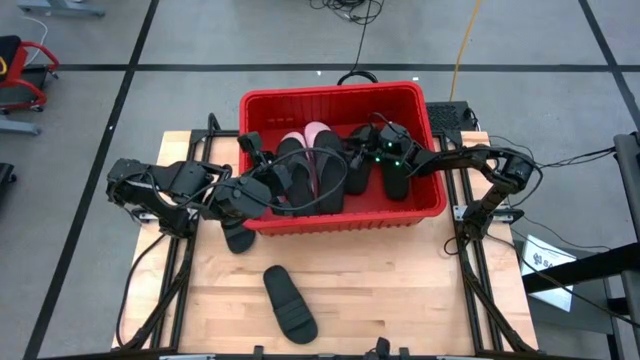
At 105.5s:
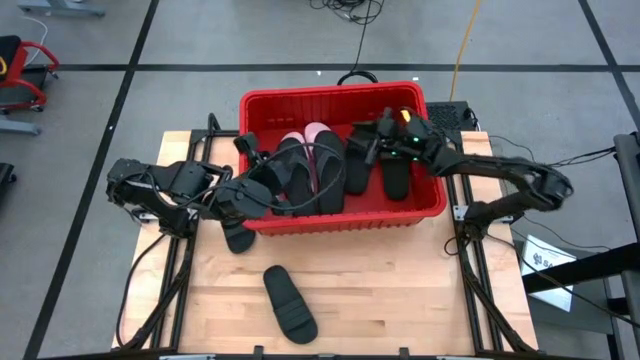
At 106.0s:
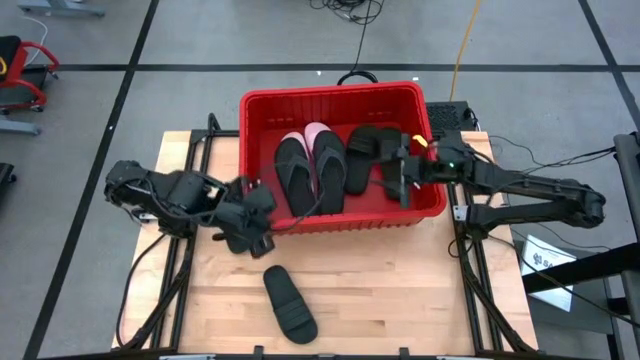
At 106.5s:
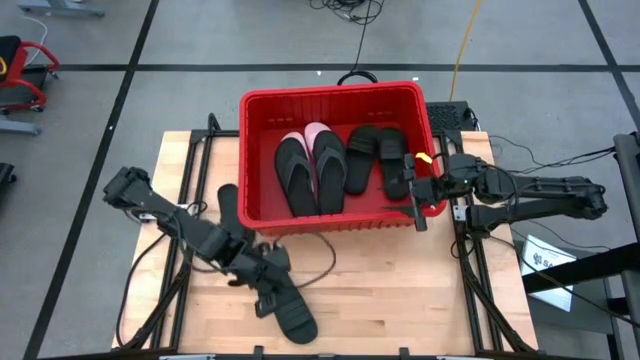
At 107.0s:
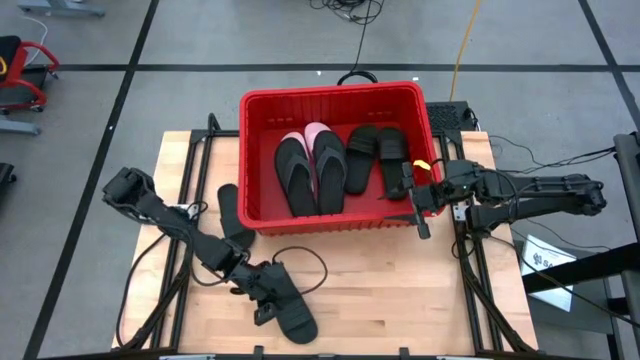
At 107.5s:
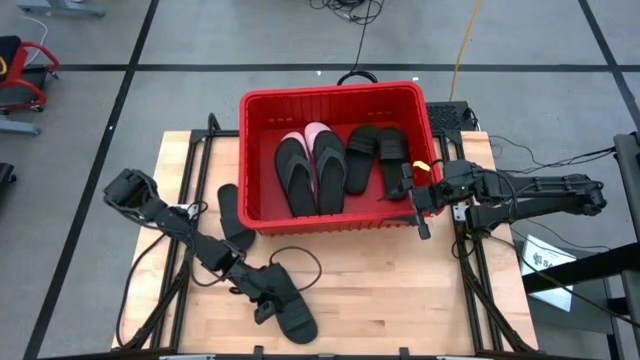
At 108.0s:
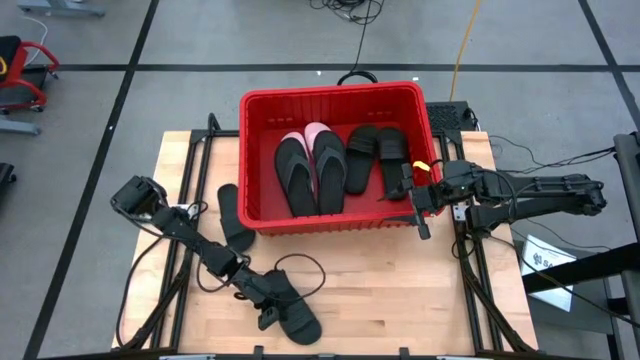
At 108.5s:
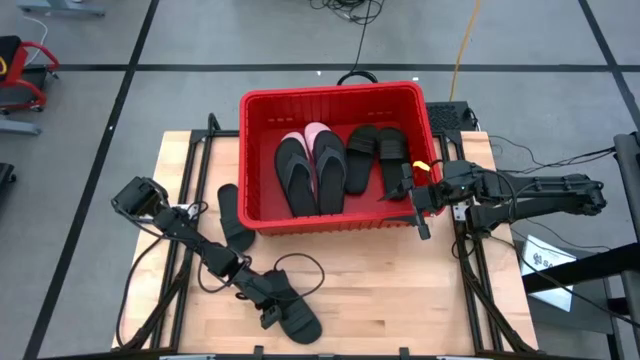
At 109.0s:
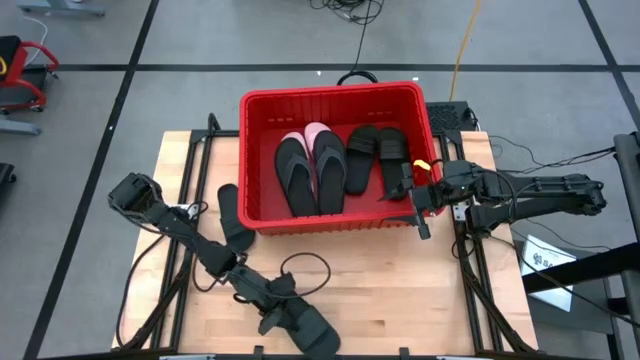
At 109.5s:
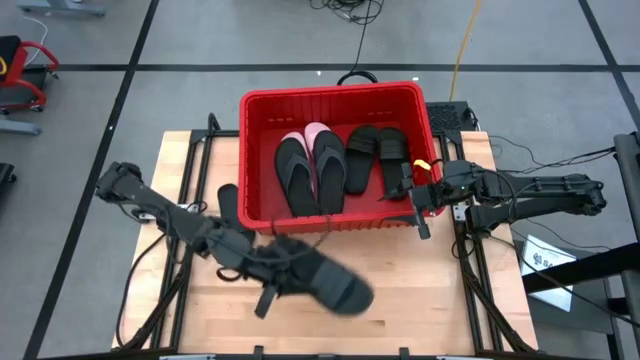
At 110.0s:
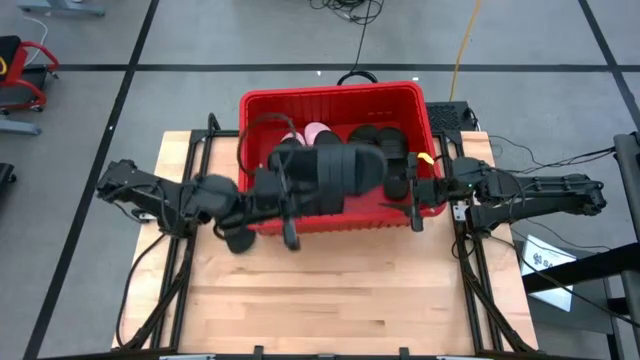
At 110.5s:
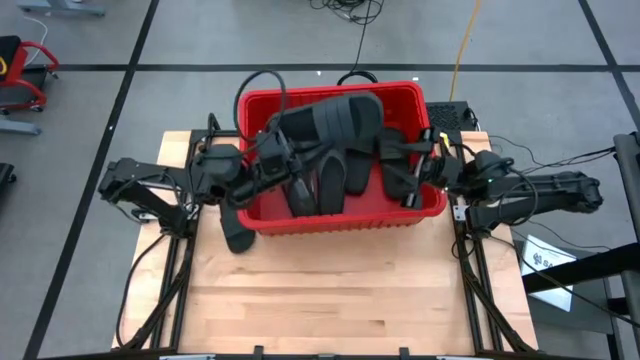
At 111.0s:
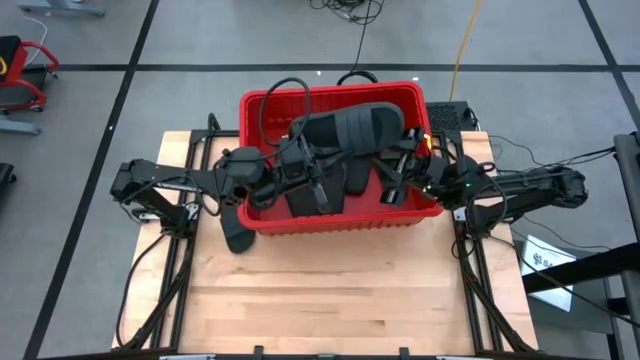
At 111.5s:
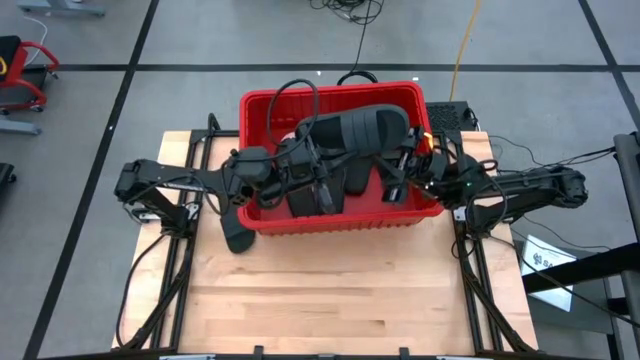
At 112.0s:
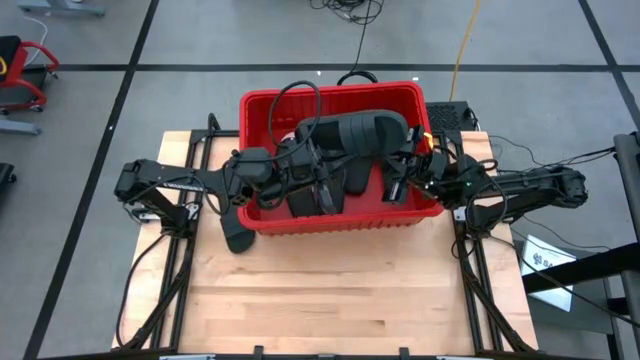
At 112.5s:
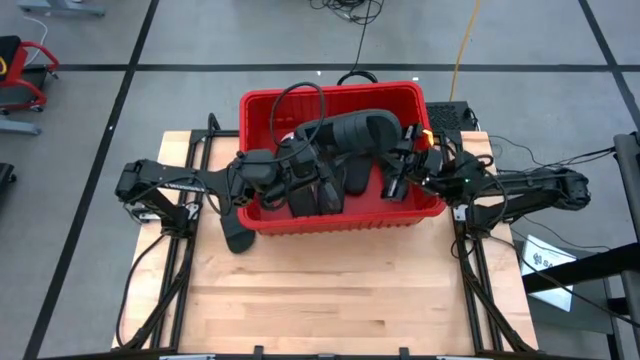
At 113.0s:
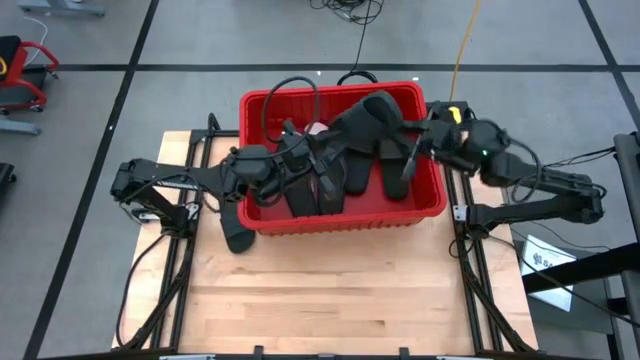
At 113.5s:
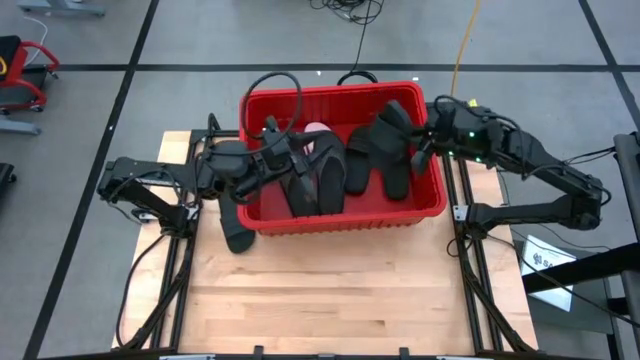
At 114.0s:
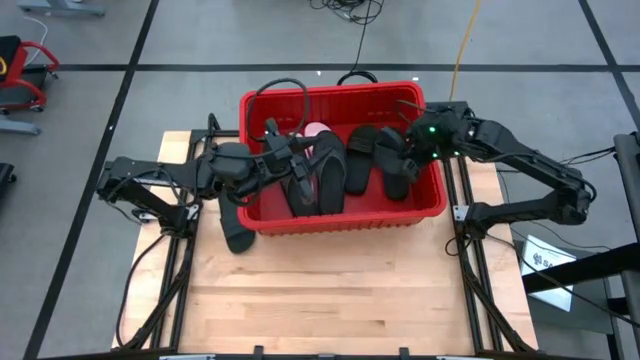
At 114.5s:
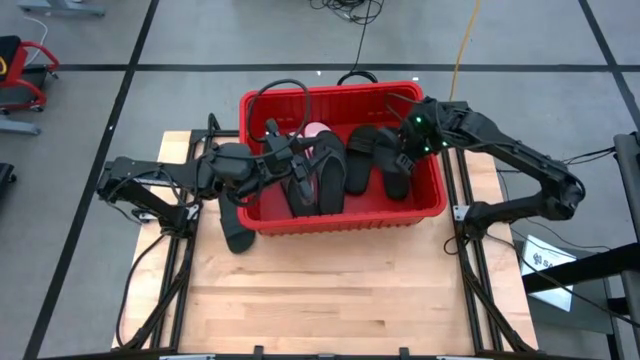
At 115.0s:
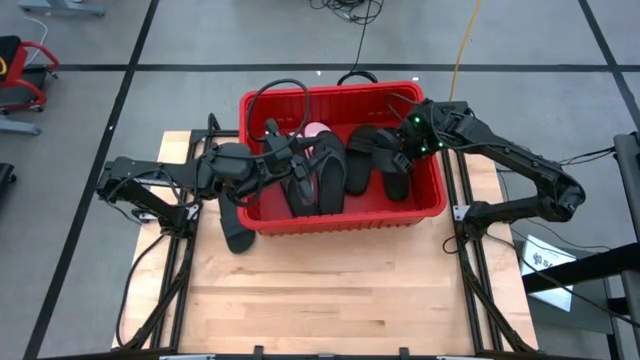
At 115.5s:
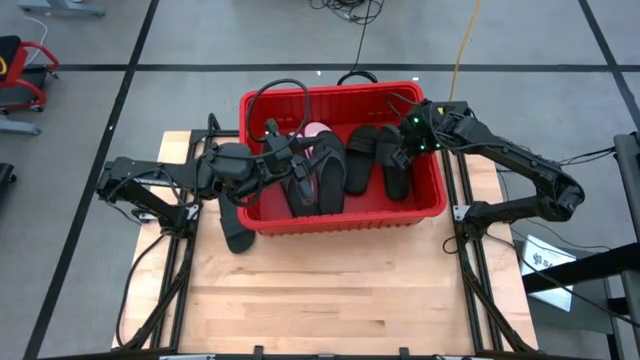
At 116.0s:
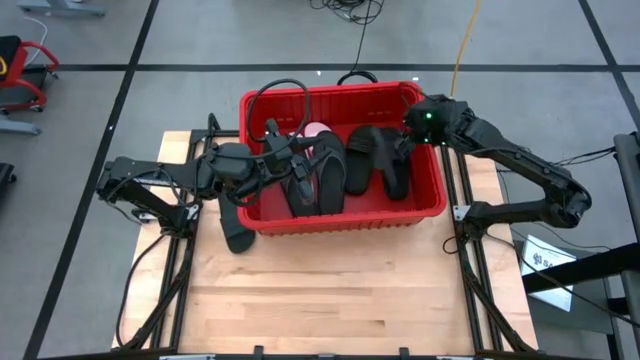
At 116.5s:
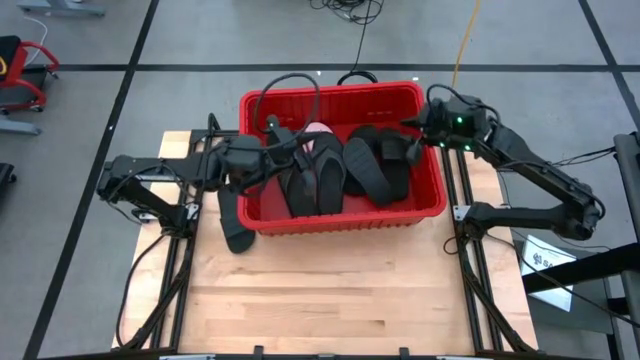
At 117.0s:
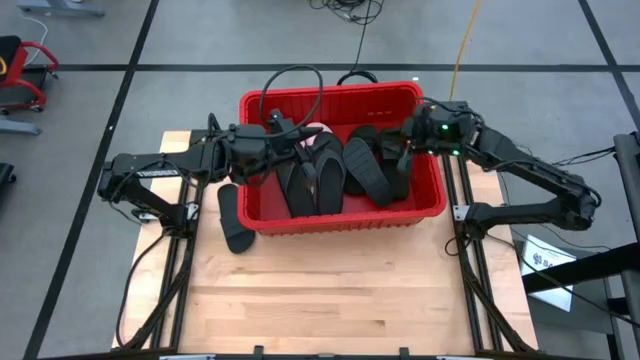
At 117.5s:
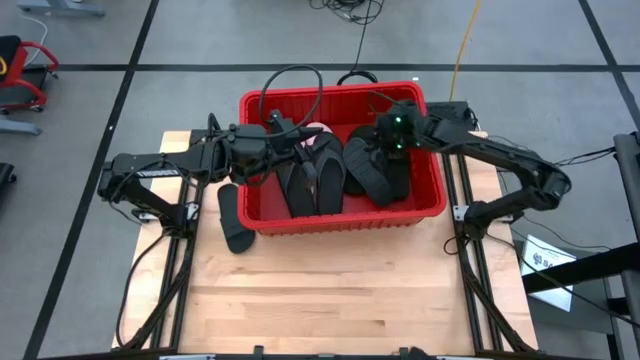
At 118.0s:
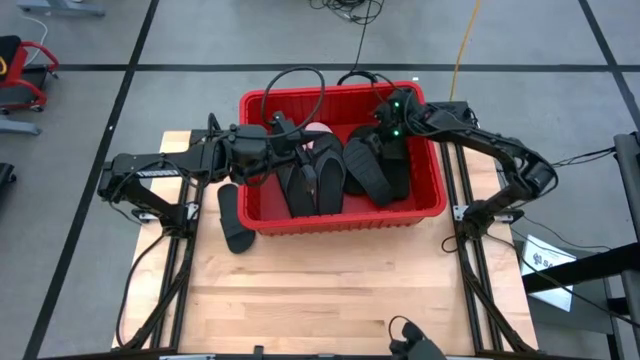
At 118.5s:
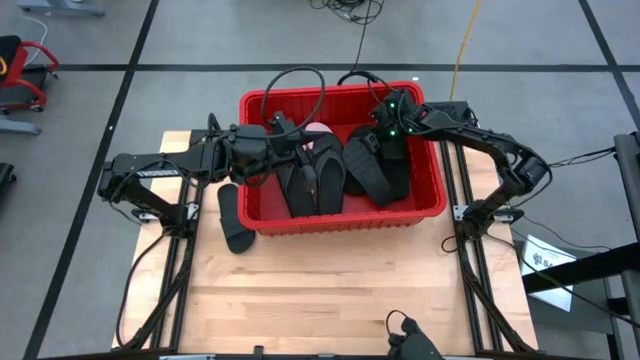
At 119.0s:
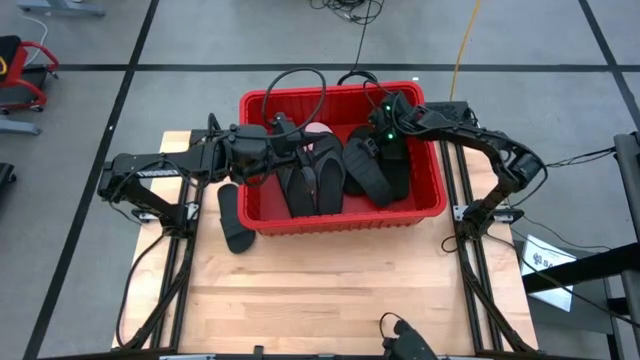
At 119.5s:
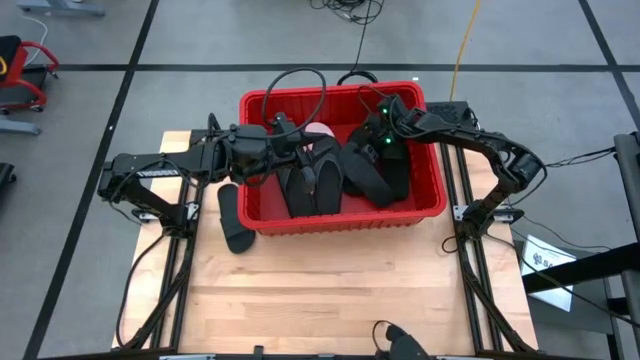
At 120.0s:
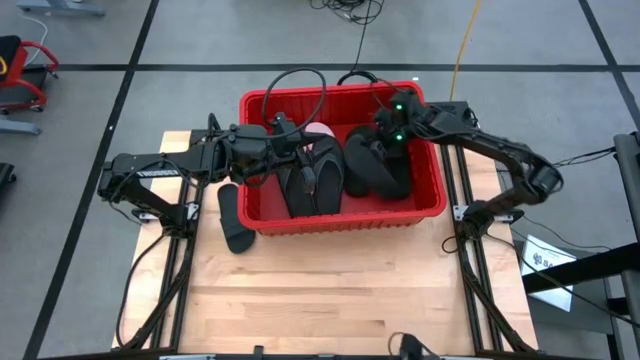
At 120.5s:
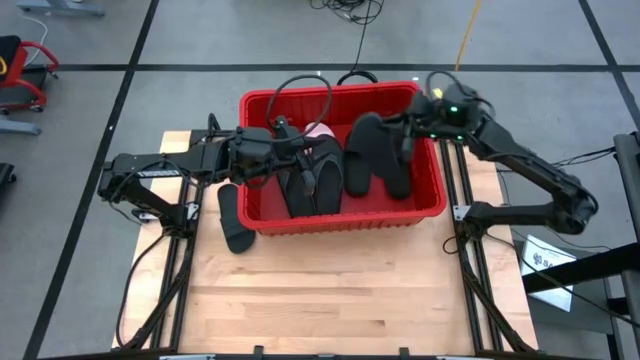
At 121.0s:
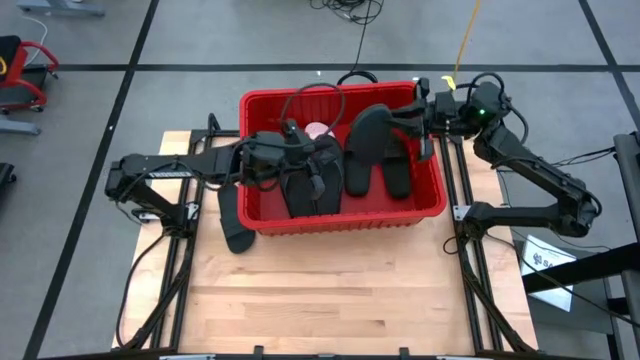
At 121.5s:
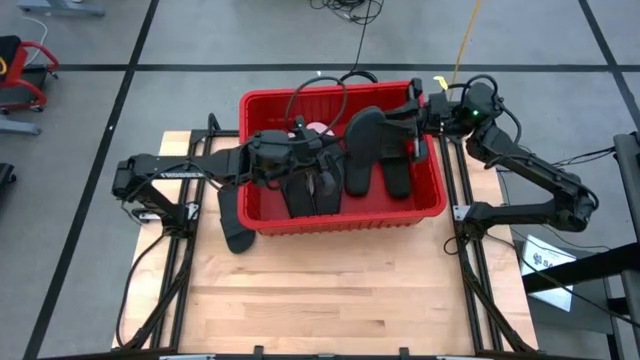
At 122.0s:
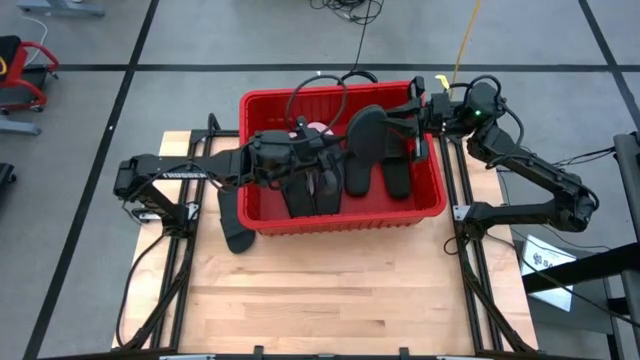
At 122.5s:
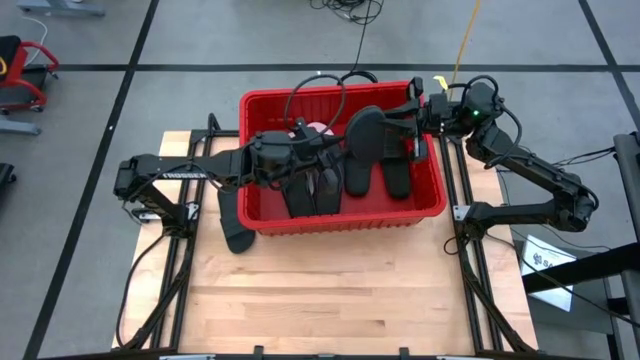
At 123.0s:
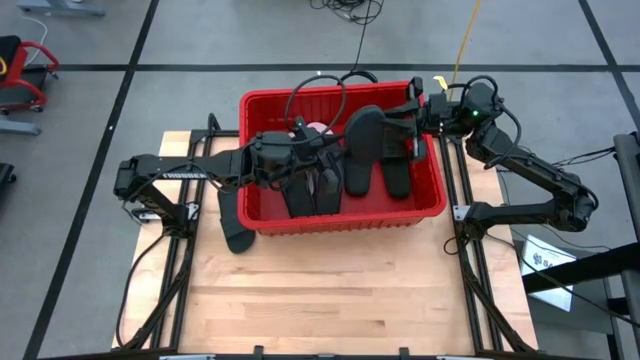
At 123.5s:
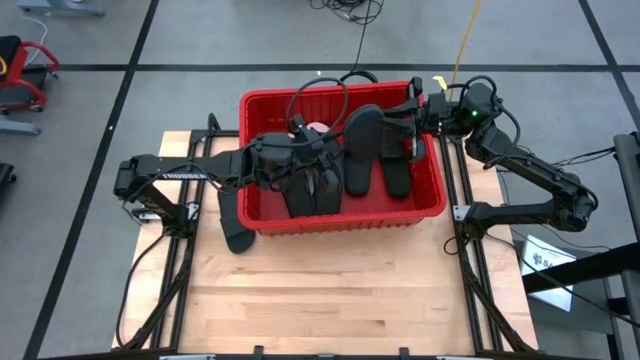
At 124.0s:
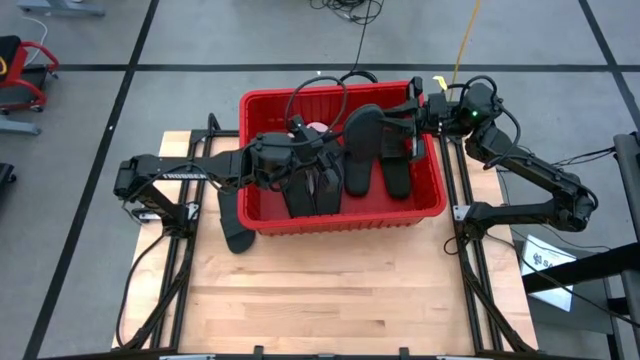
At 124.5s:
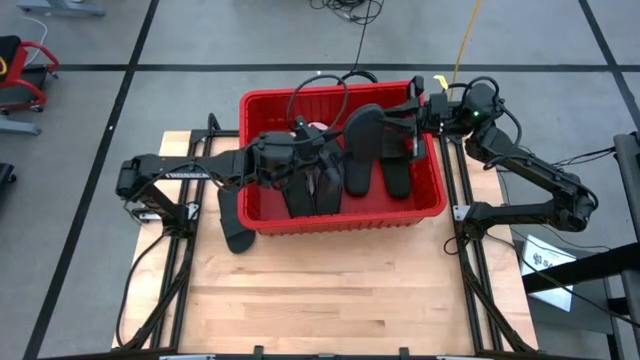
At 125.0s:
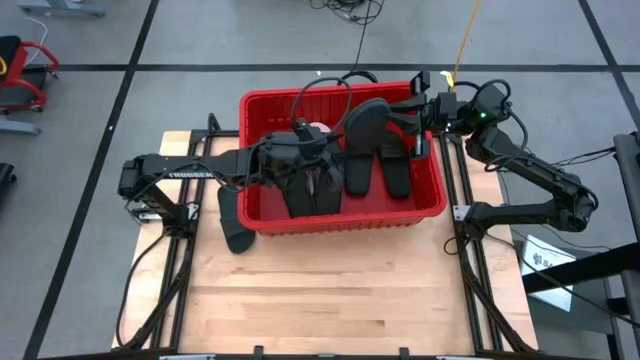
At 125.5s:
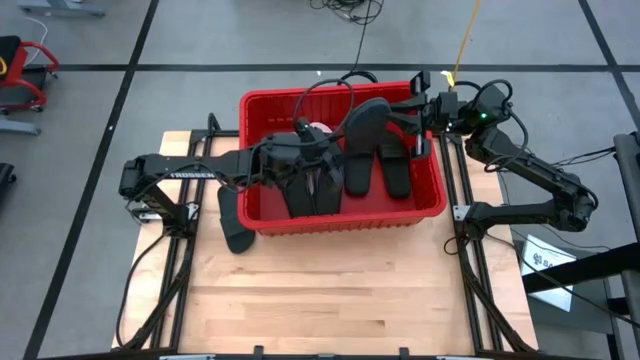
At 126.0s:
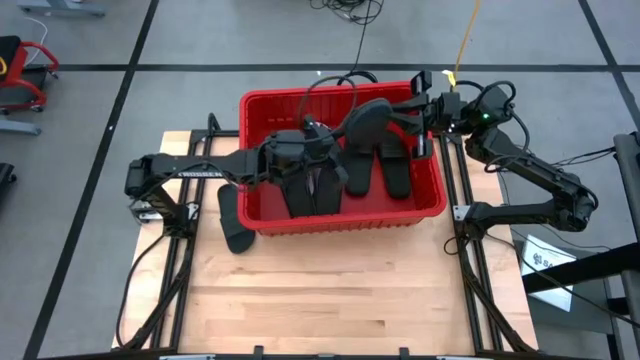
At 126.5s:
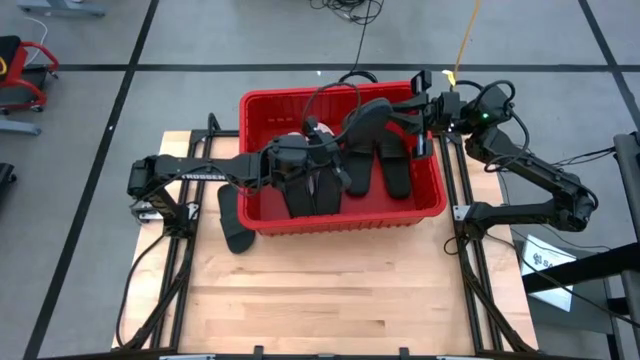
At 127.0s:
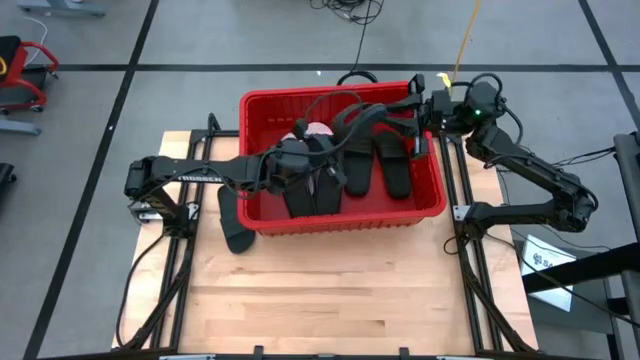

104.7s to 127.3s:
Task: Pick and place slides into bin
Put the black slide into the red bin
